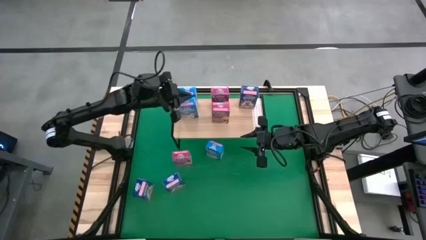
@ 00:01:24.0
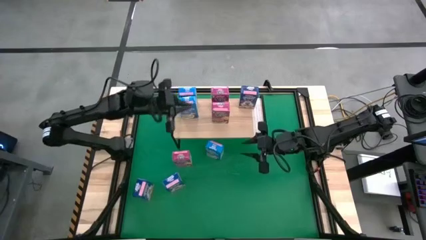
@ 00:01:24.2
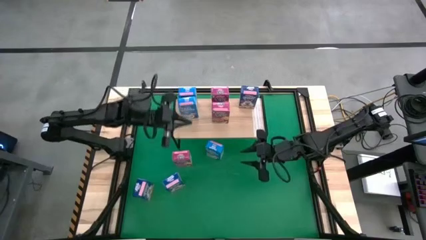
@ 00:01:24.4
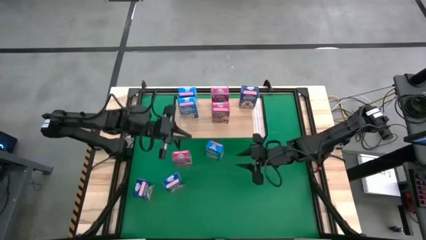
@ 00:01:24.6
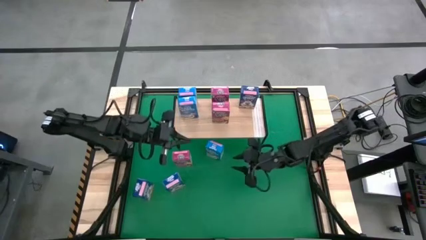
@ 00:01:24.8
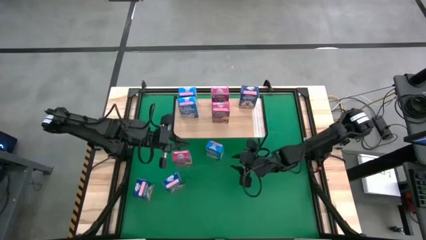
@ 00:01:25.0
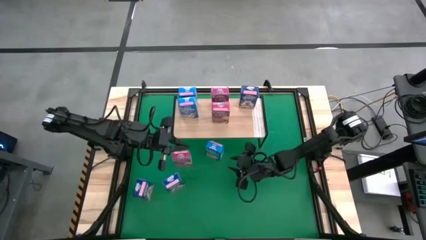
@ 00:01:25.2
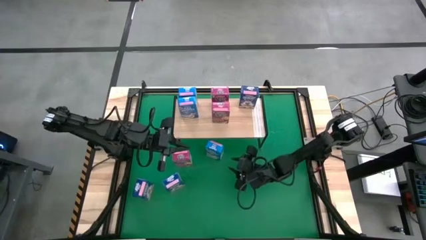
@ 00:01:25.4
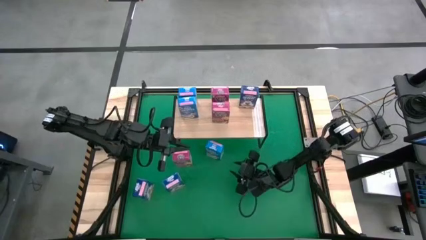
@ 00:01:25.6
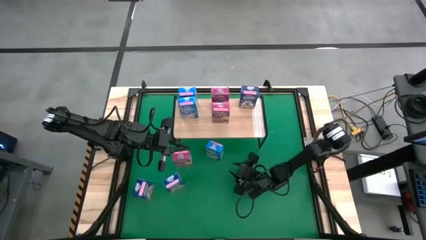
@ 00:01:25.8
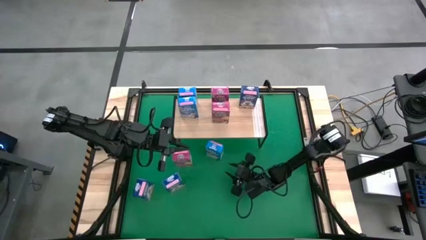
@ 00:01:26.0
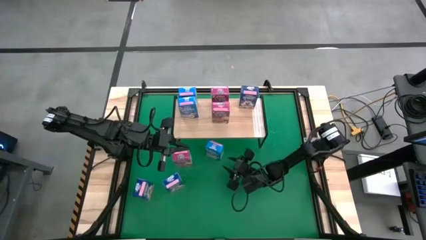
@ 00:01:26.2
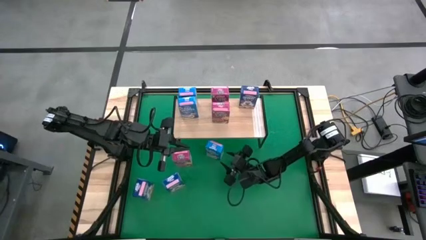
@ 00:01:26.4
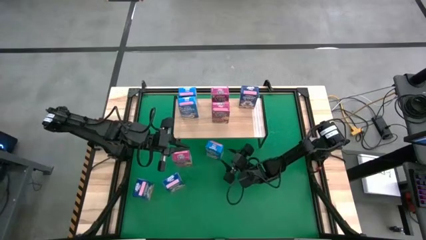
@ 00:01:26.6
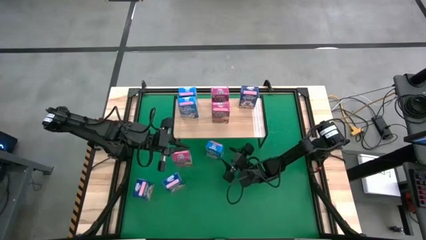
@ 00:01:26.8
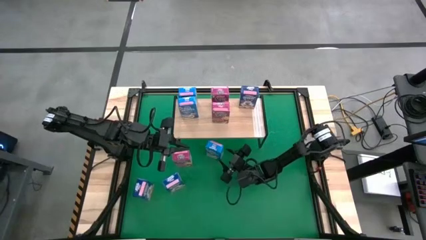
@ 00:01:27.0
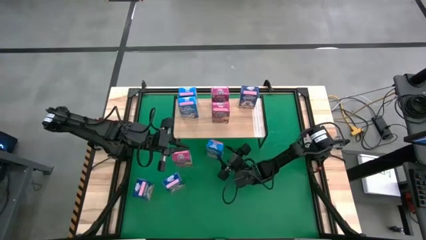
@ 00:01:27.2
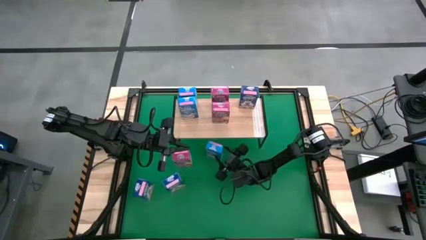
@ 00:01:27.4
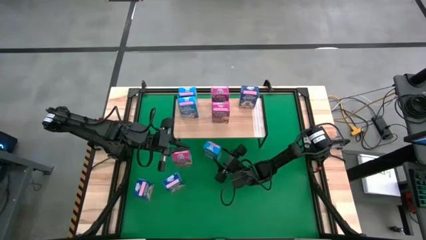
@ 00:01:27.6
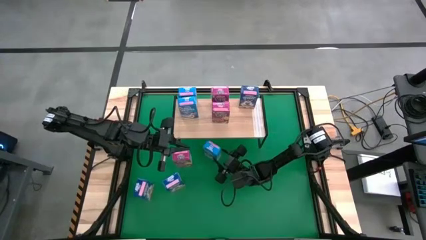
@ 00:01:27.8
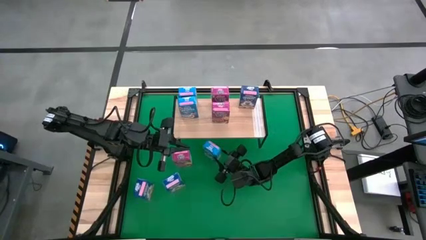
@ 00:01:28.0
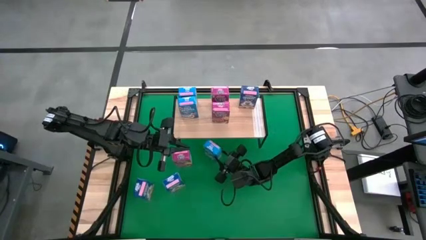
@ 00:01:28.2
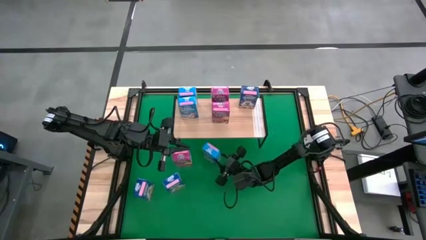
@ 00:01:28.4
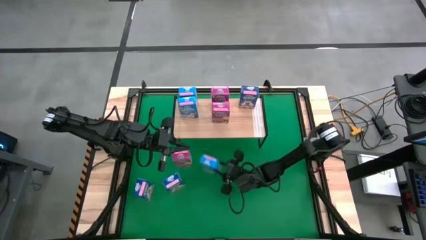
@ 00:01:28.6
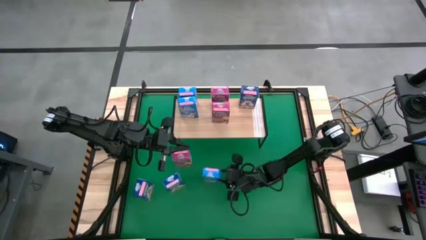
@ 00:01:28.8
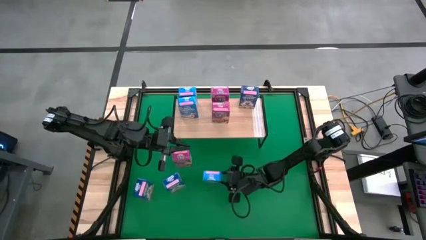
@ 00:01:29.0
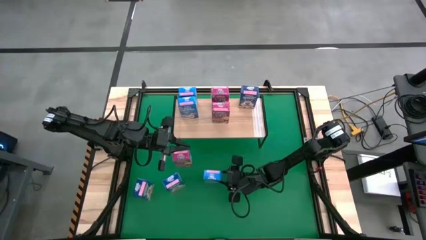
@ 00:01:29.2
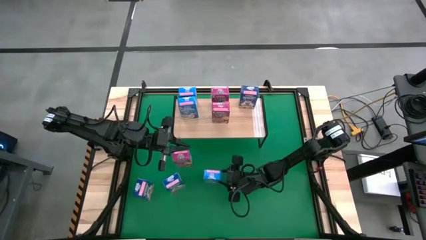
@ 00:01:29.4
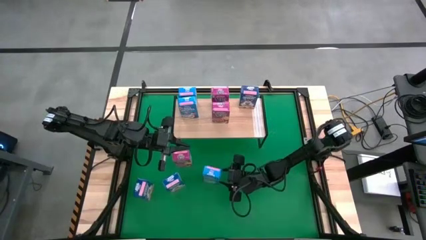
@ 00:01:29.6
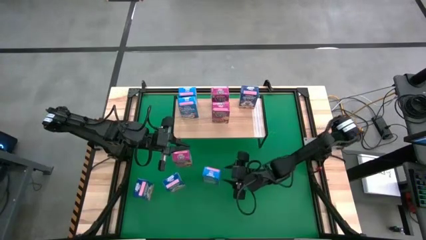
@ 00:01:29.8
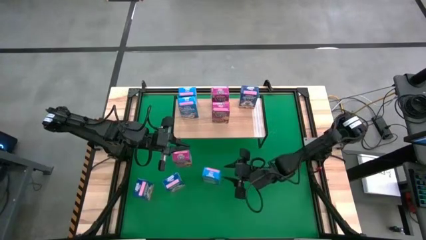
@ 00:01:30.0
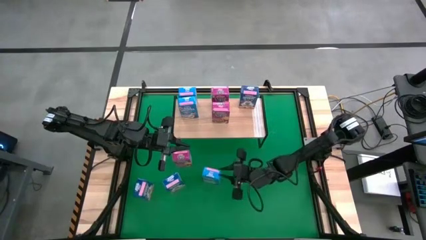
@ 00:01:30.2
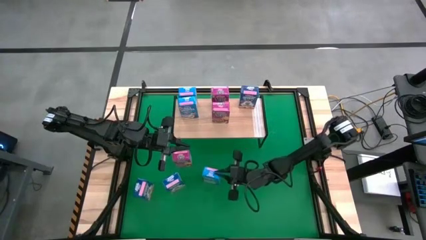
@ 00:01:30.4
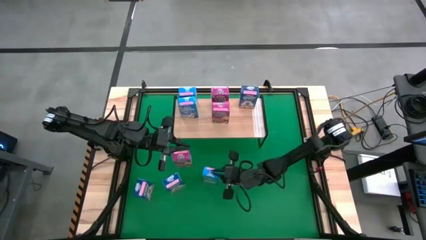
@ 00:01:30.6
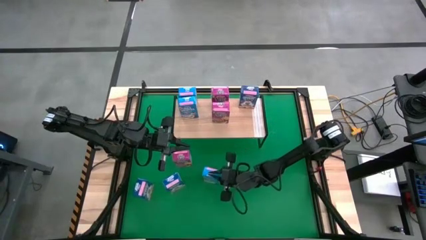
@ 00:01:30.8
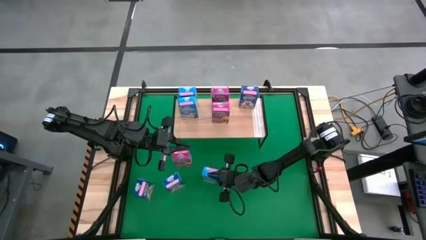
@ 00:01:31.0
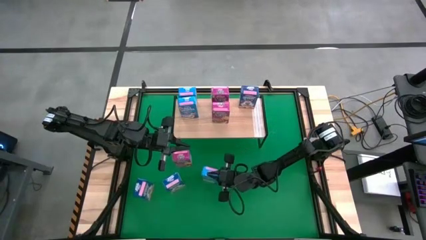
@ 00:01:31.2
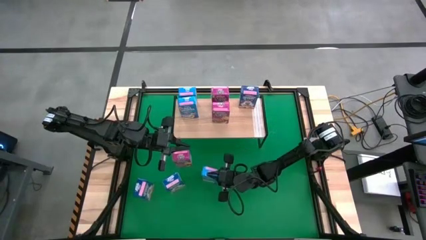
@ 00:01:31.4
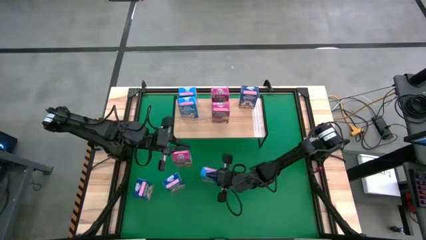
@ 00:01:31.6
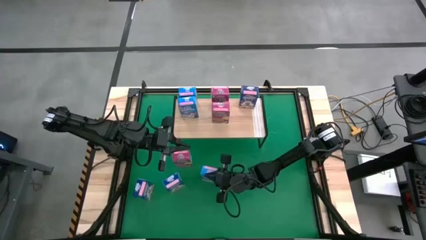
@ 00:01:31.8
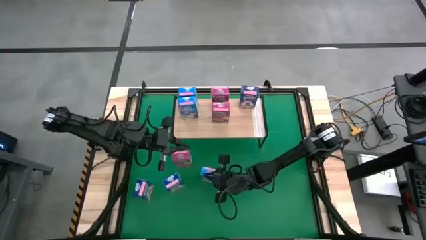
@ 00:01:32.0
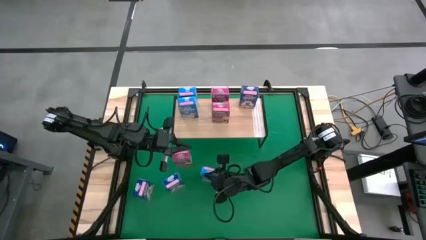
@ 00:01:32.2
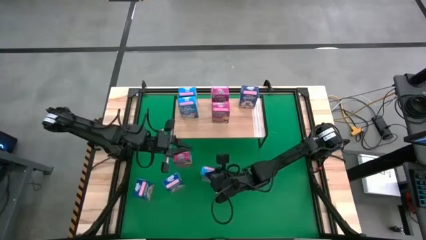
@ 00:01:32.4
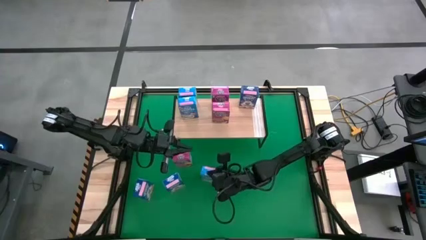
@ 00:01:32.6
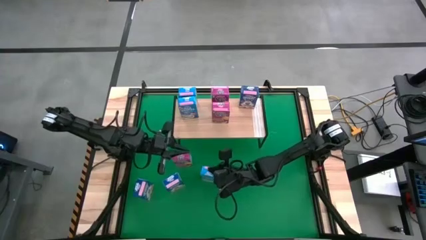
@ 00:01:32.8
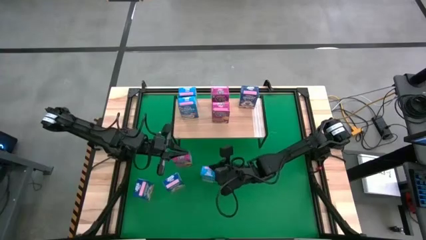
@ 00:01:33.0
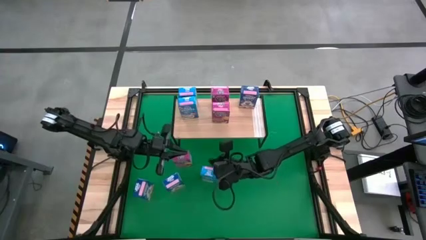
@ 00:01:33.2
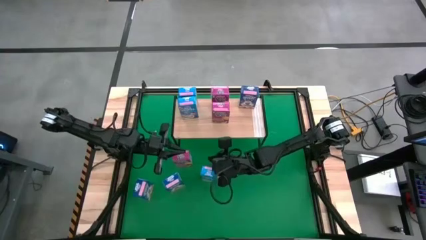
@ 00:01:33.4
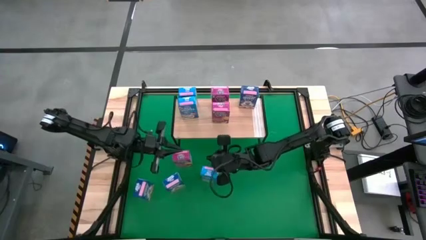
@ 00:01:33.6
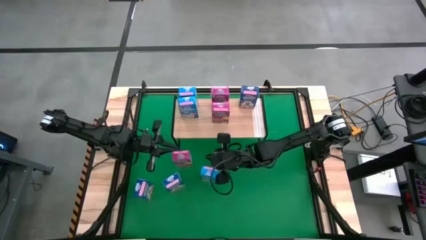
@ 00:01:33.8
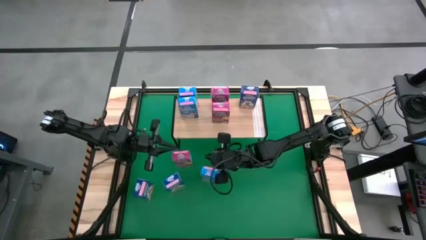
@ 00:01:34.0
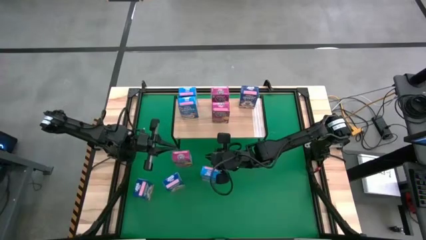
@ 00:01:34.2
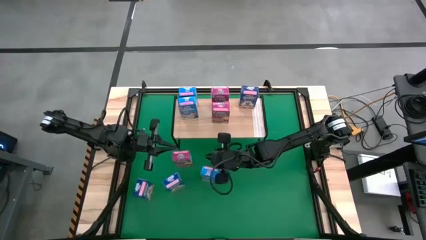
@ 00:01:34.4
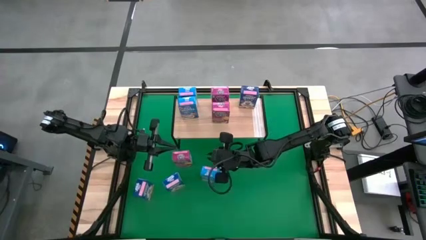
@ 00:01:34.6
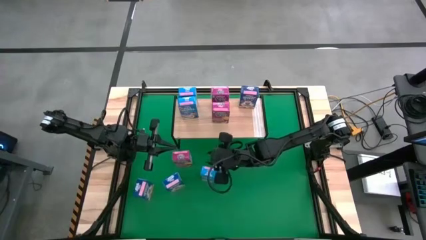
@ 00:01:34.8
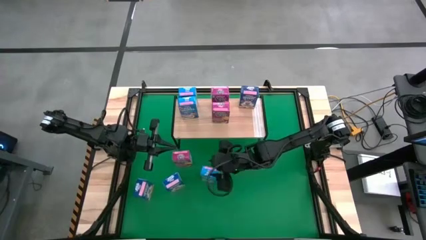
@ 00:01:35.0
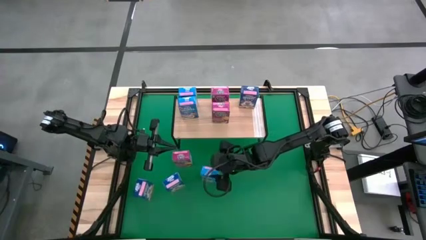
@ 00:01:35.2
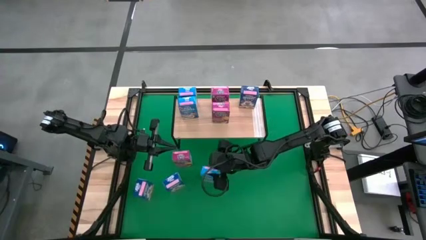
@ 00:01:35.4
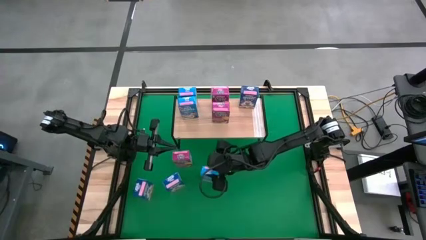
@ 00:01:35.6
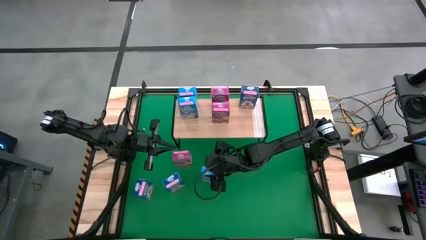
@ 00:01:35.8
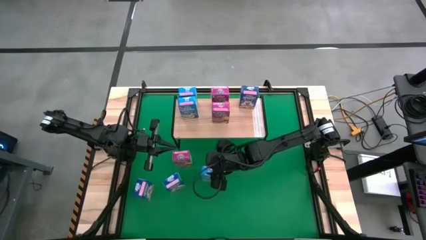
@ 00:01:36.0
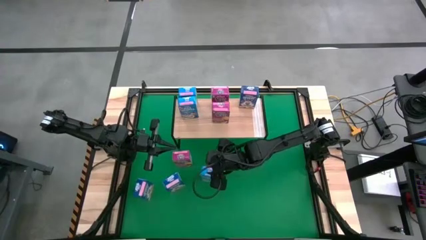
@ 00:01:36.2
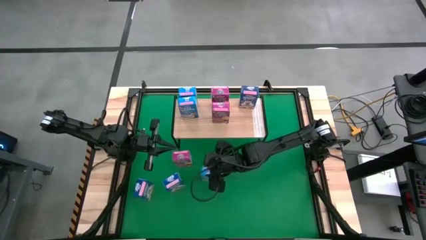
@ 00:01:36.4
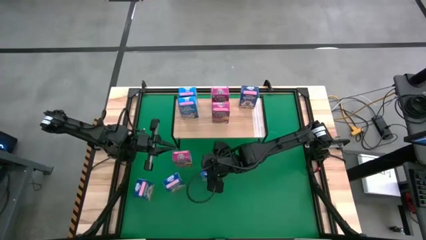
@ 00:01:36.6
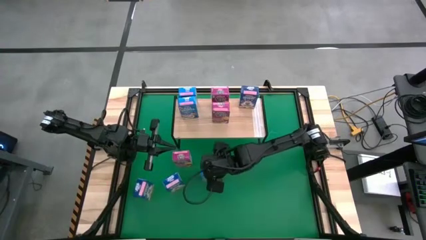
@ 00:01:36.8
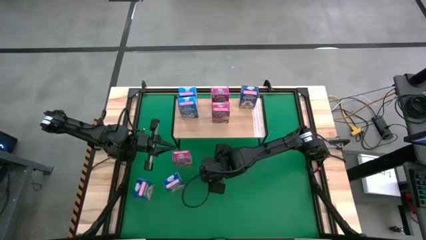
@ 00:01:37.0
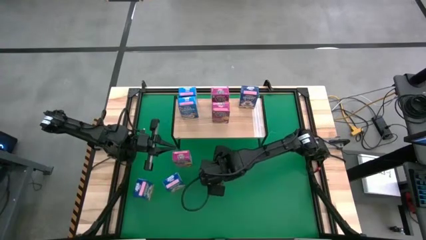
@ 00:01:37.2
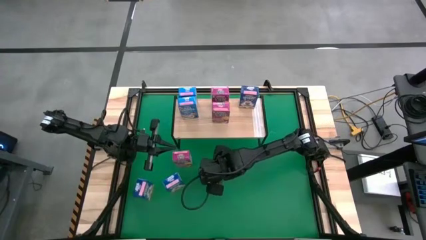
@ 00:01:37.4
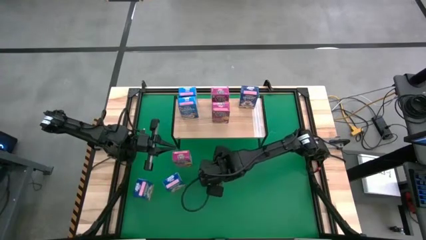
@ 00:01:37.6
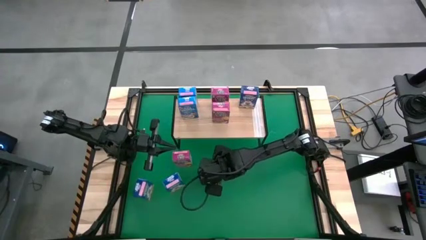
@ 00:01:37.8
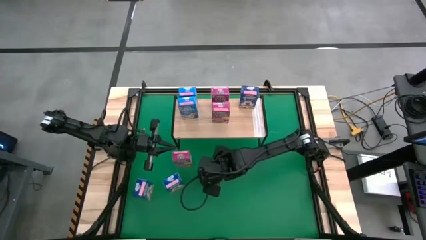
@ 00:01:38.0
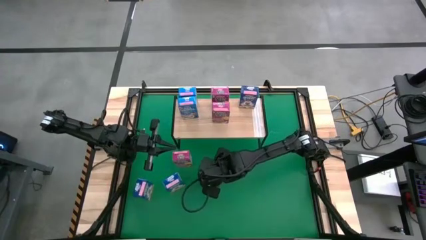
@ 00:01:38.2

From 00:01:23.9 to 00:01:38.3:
Task: Stack cereal on shelf
Put the light blue cereal box, aligned with the other light blue cereal box on the shelf

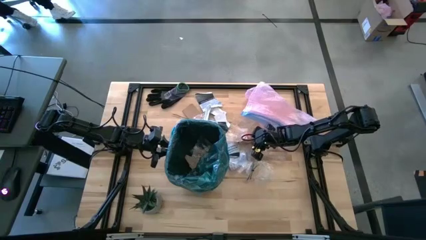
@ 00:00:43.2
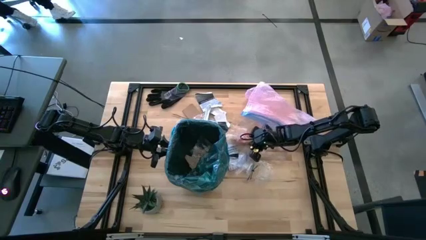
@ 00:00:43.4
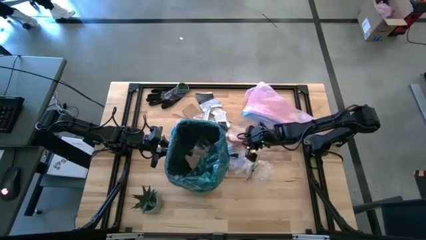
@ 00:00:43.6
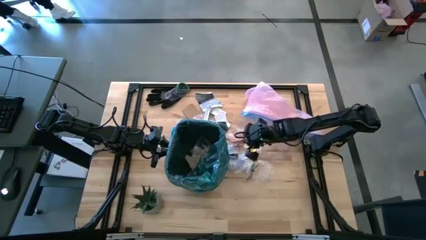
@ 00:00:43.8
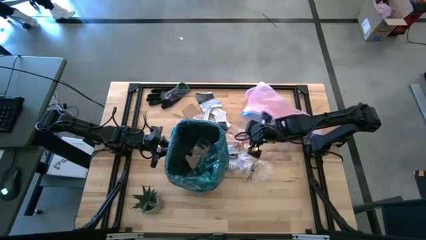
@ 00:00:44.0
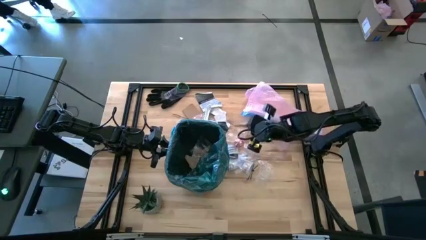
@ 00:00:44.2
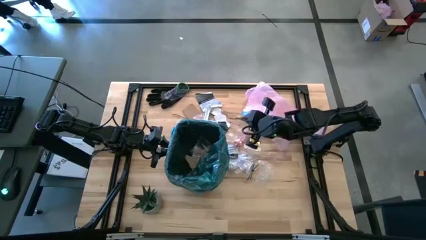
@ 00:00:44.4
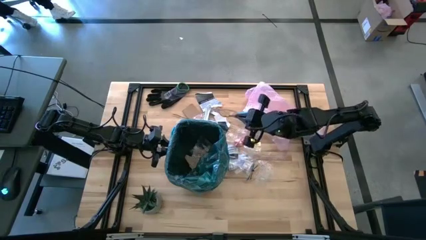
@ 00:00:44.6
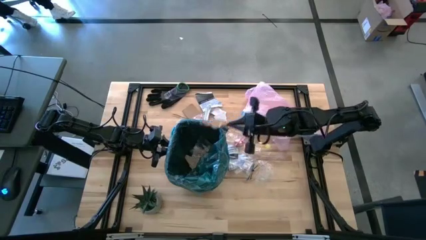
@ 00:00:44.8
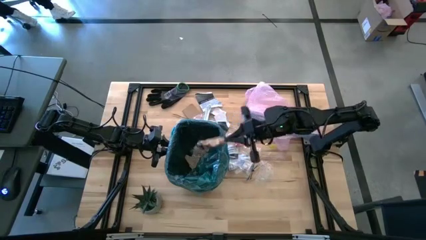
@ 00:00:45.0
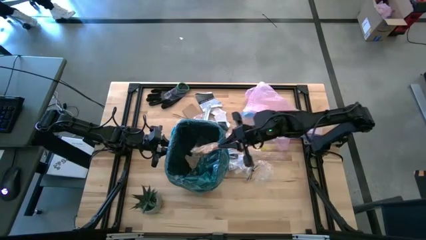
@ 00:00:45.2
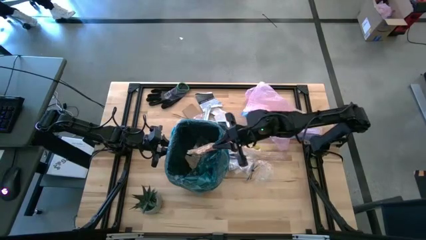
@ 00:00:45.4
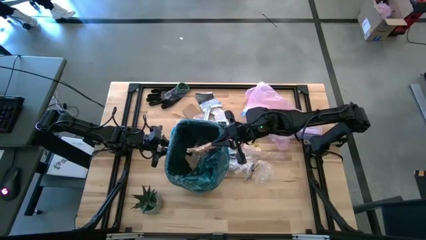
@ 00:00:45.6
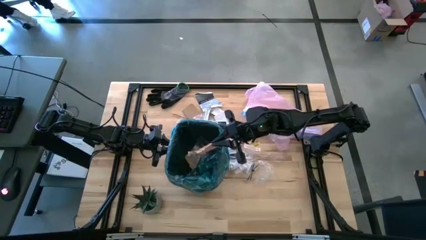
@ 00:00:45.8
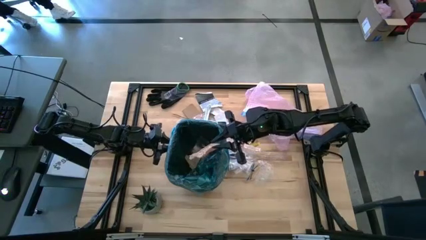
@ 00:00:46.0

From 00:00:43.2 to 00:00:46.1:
Task: place trash/remove bag and relplace
Put the brown paper into the trash bin
